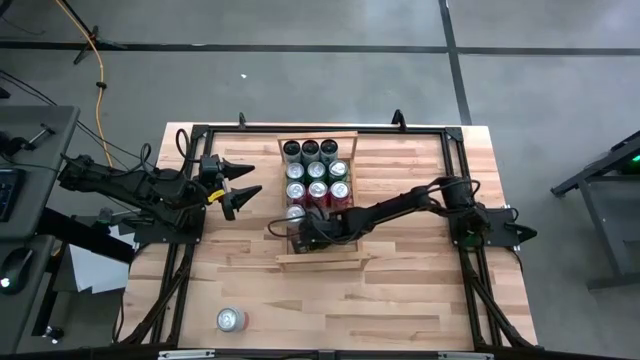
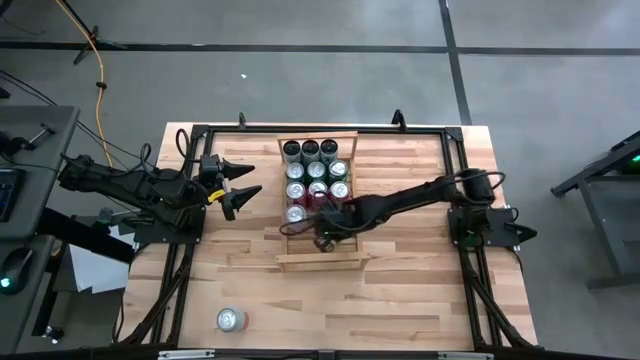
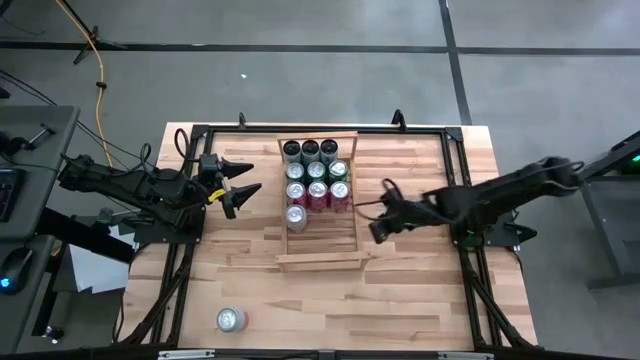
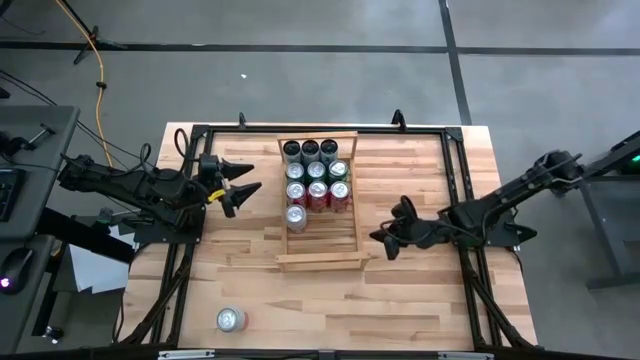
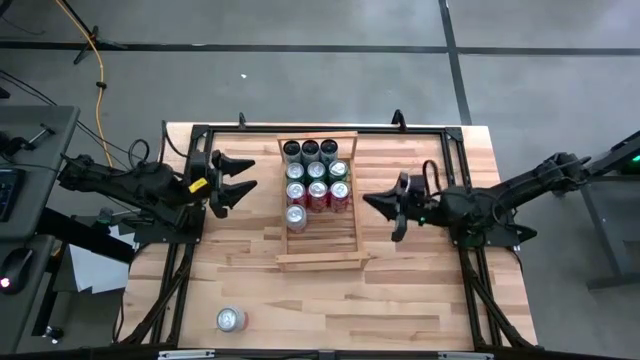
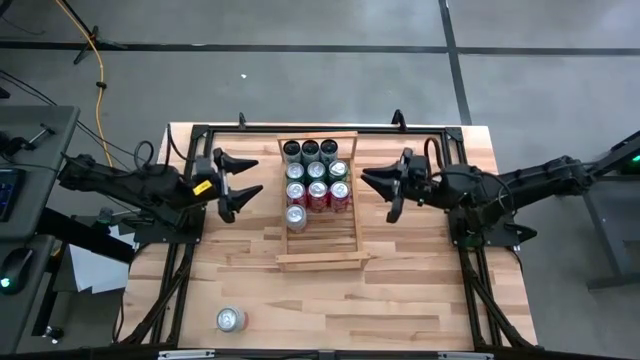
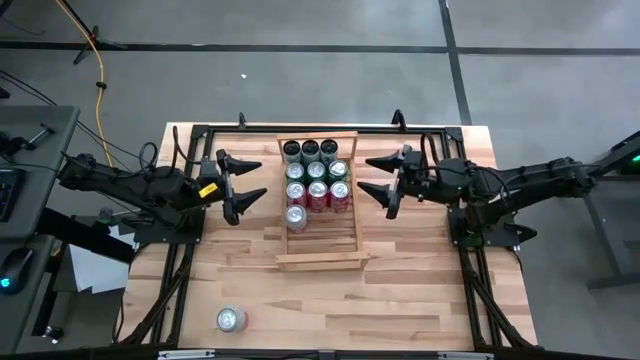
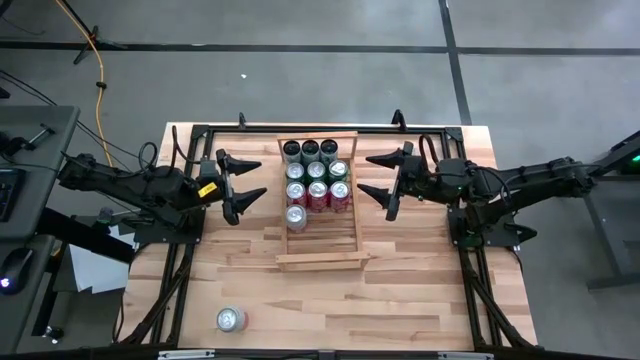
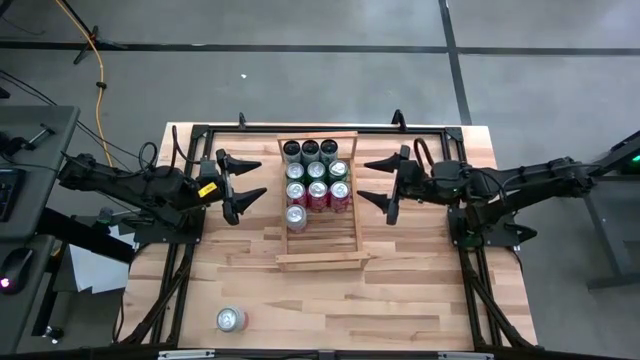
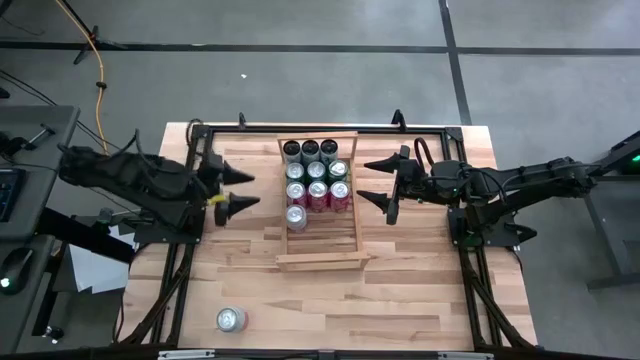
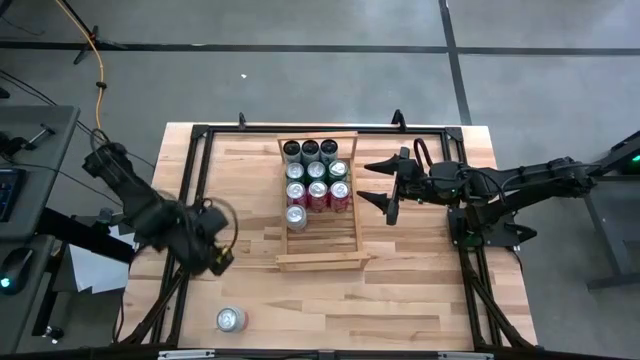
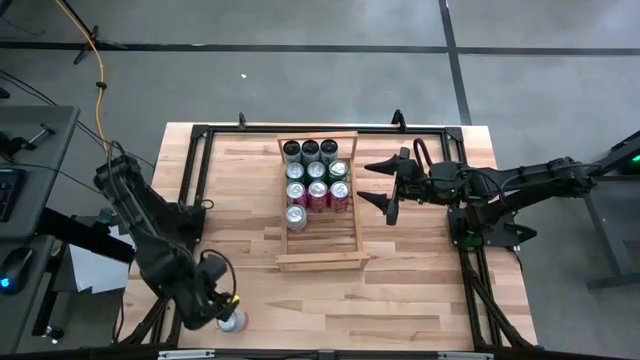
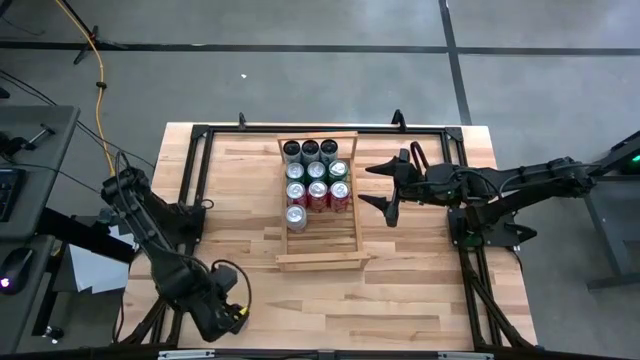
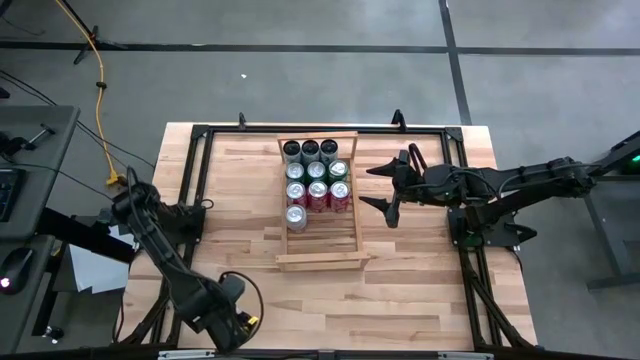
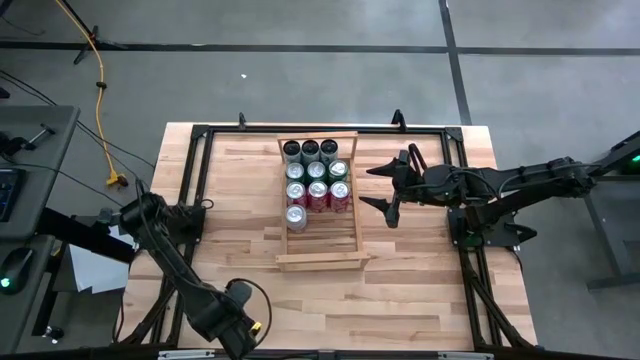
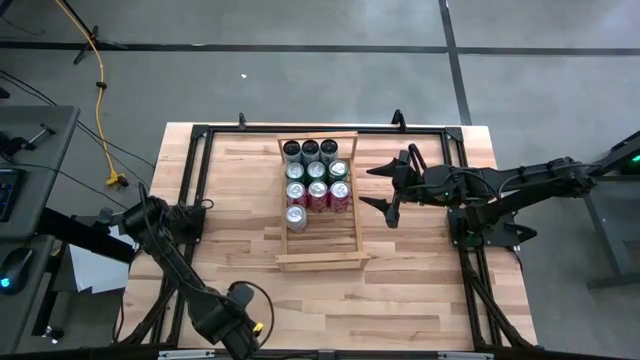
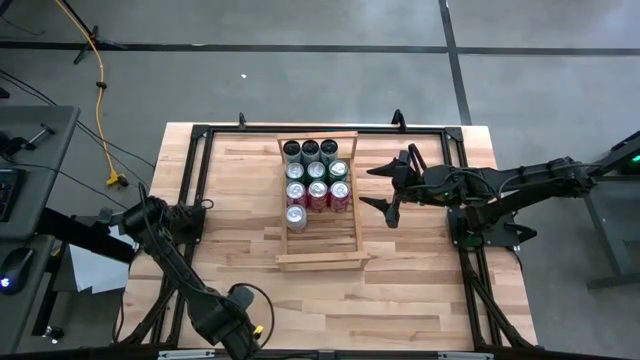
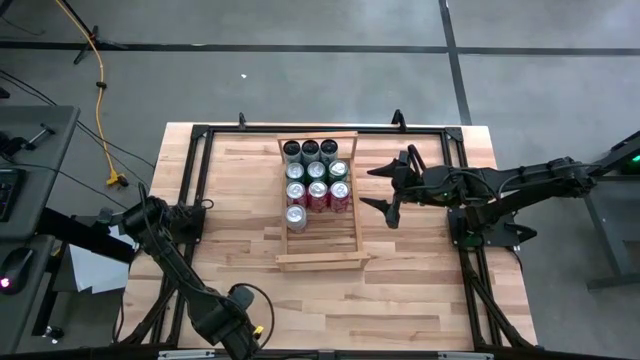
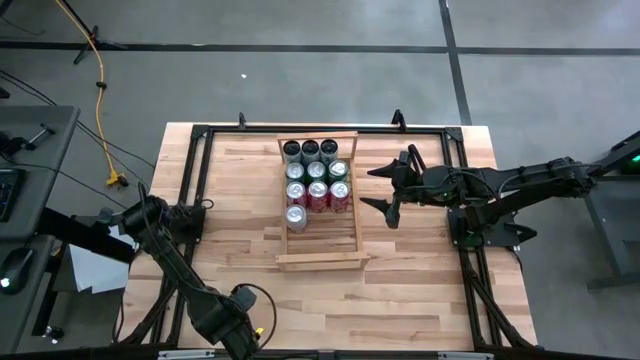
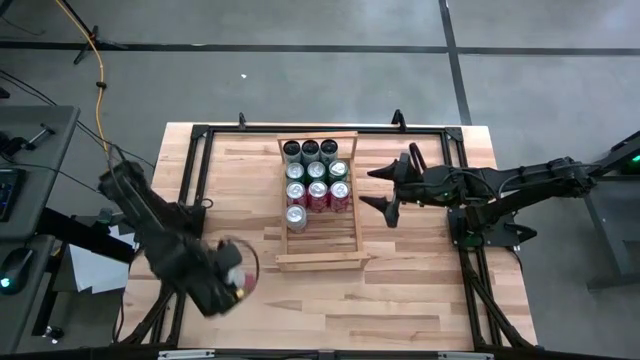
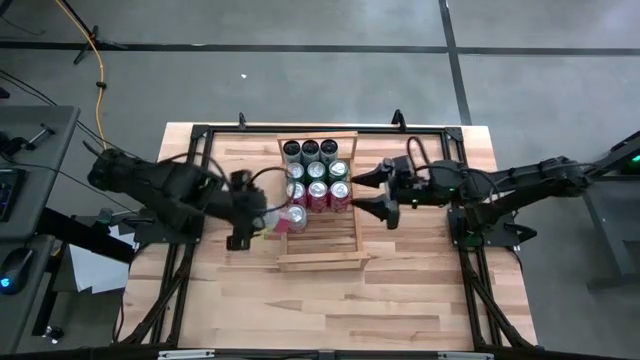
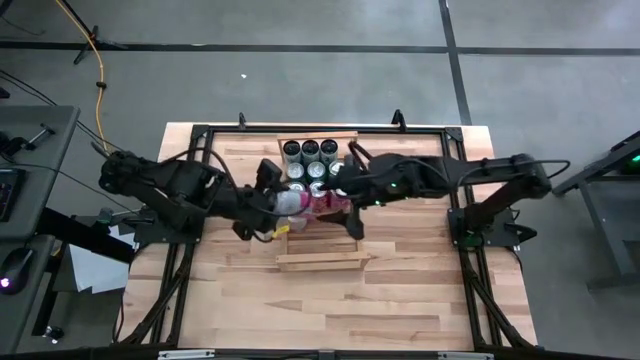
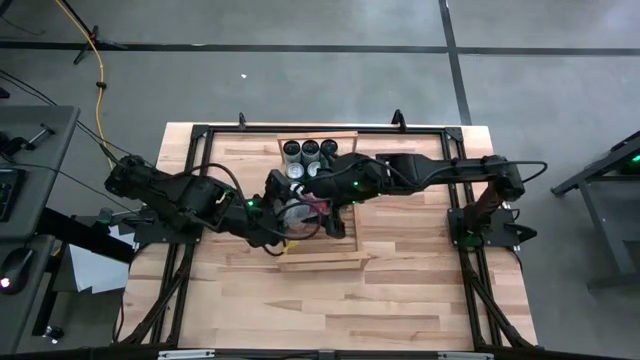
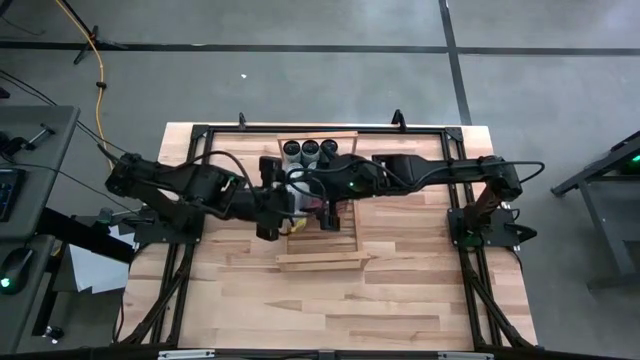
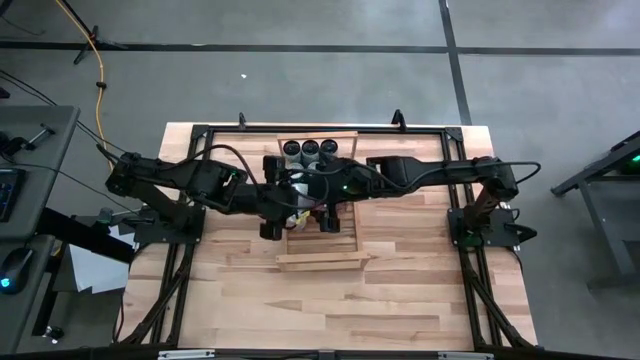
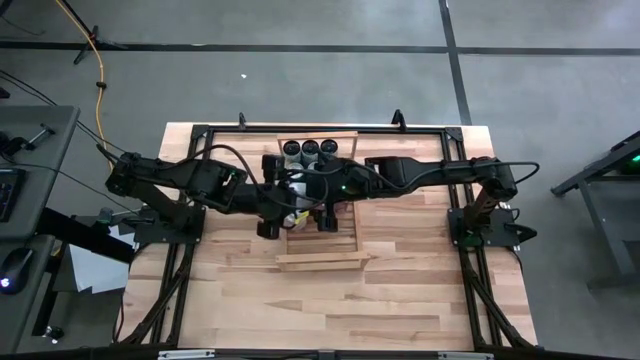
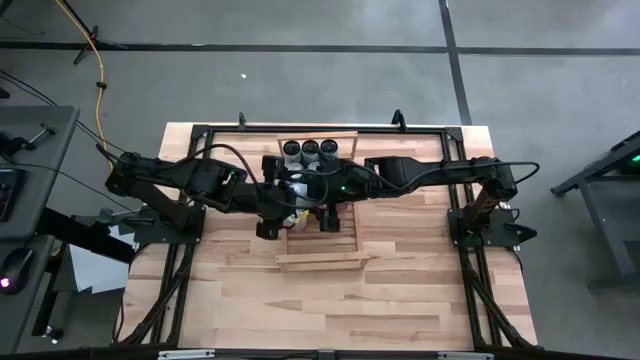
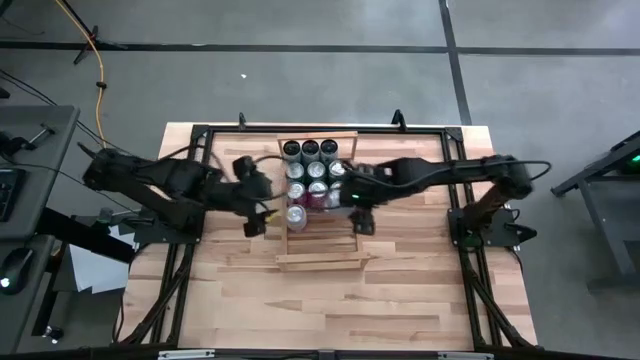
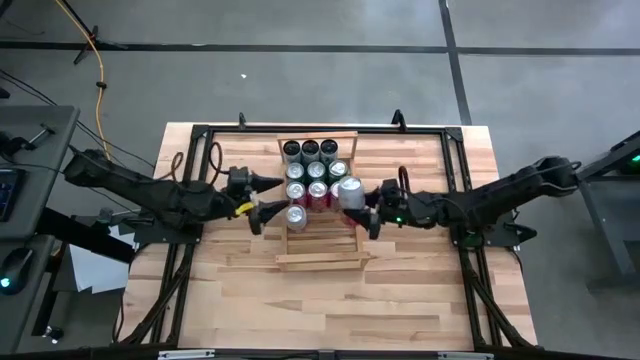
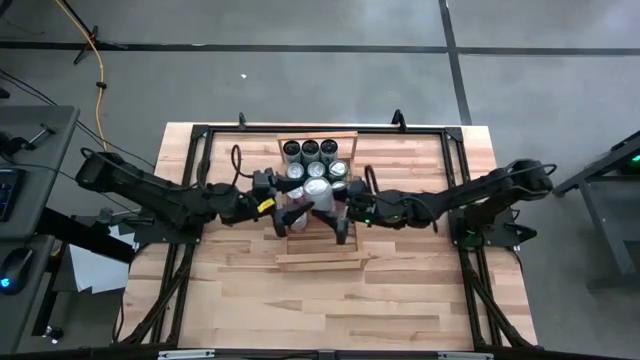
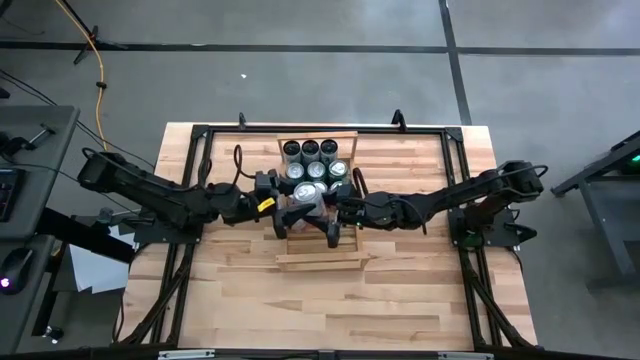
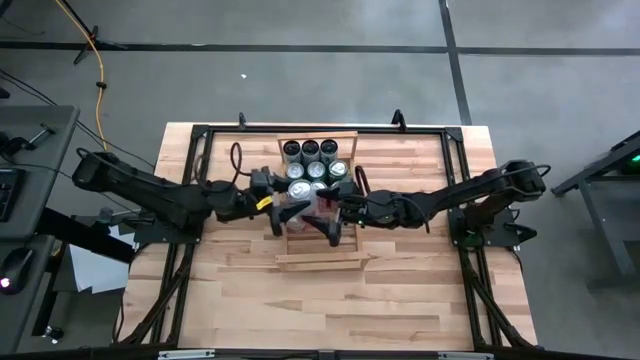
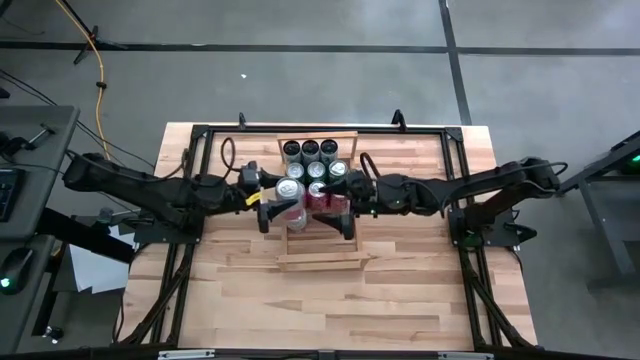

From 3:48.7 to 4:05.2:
Task: Place canned beverage on shelf
Put the pink can on the shelf aligned with the other pink can

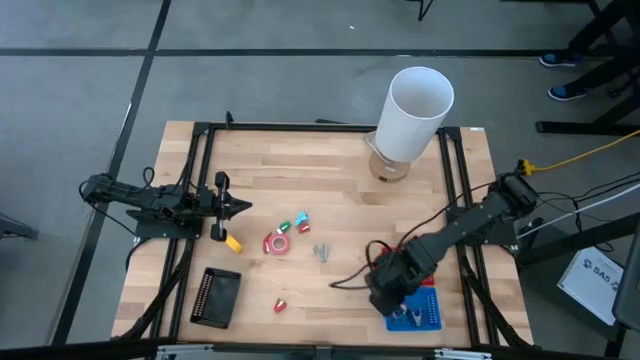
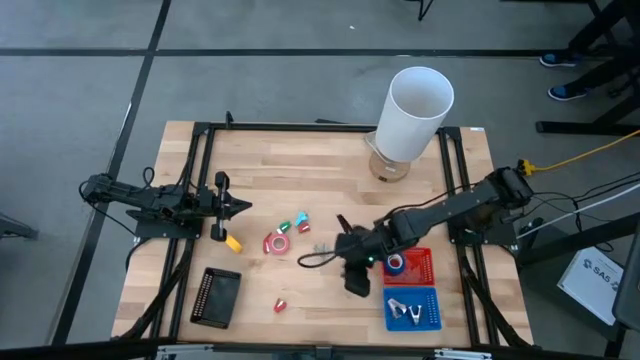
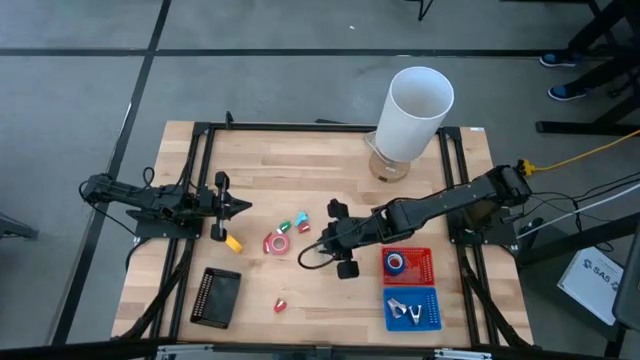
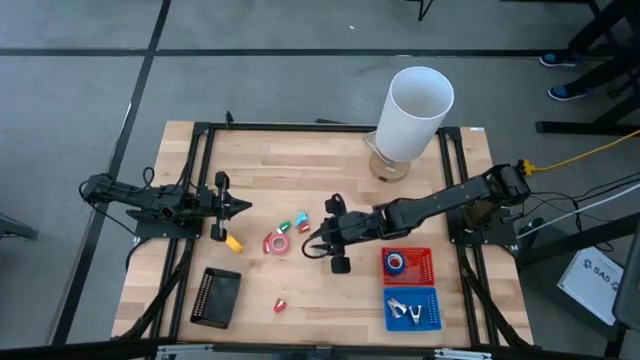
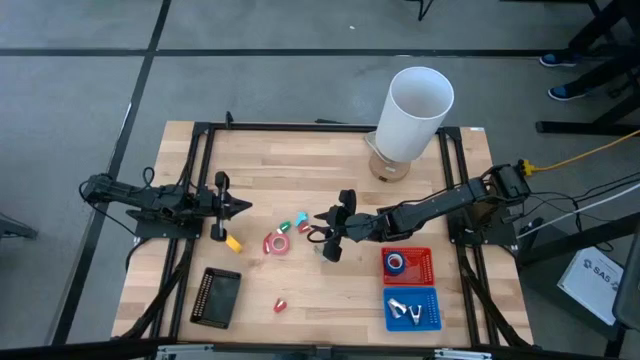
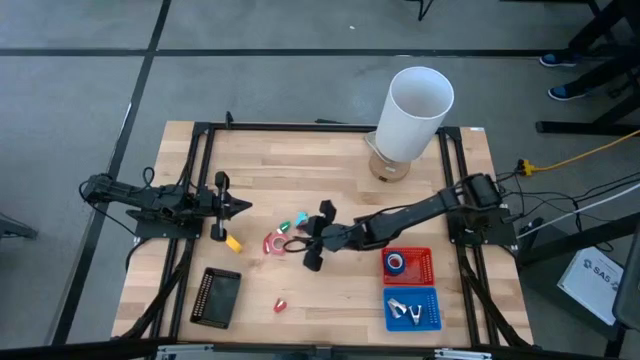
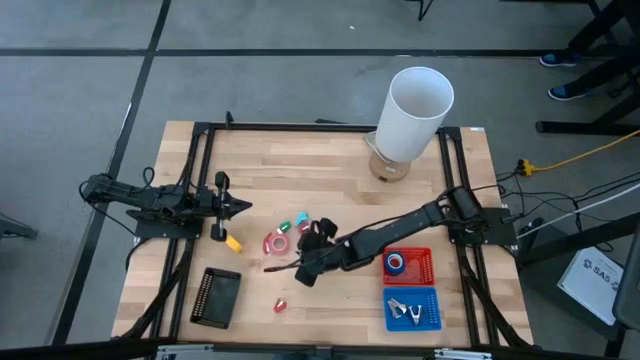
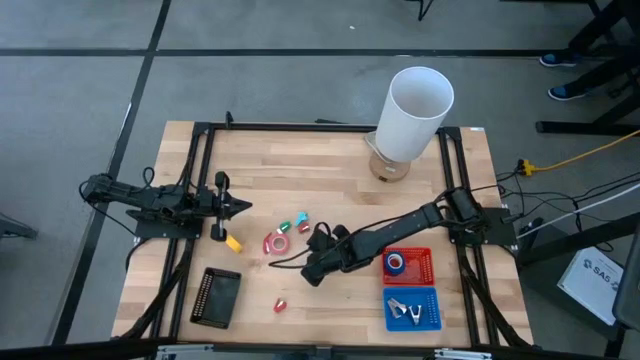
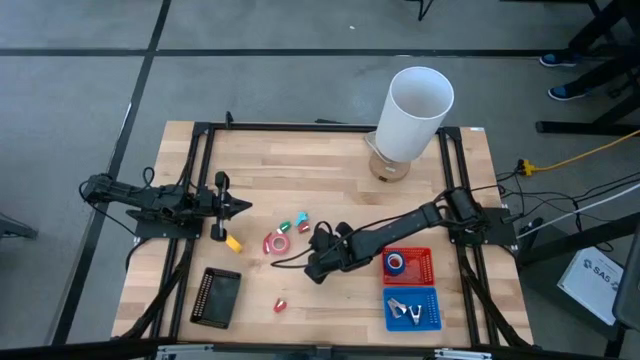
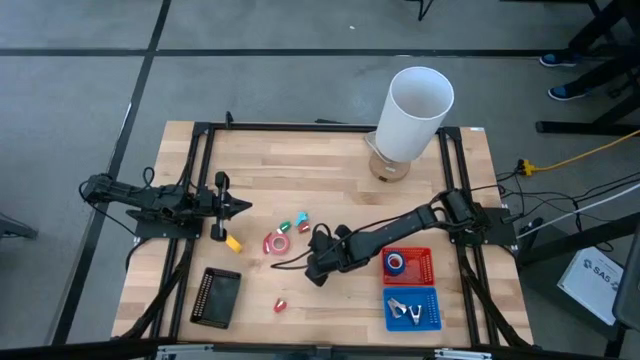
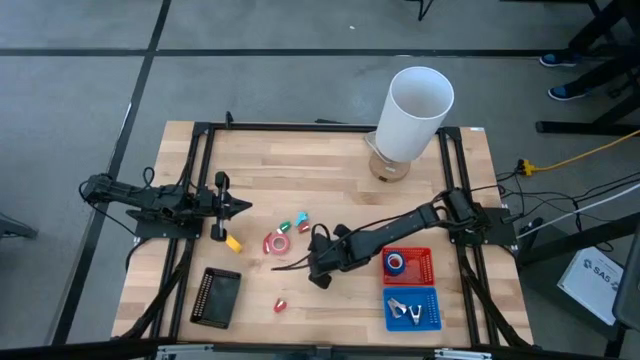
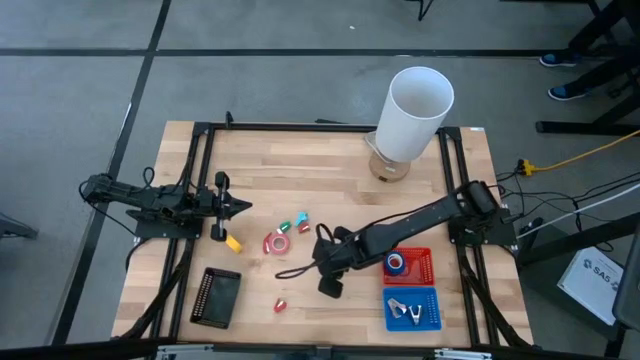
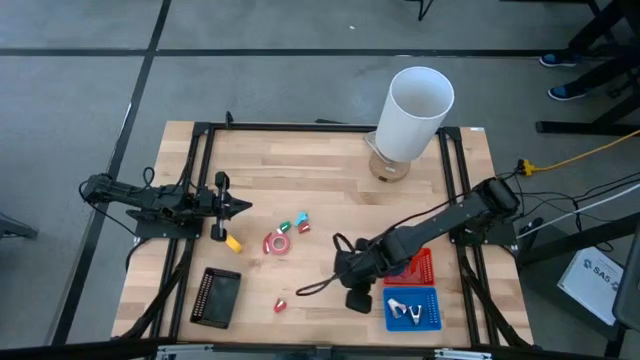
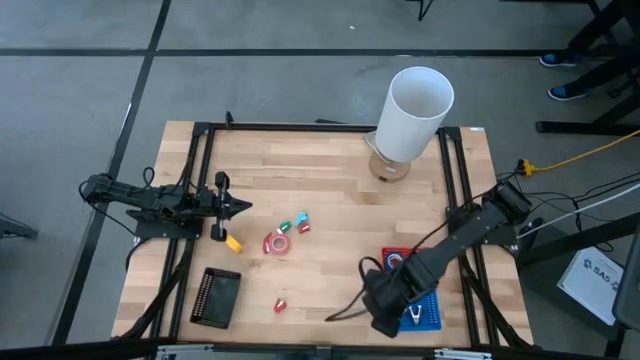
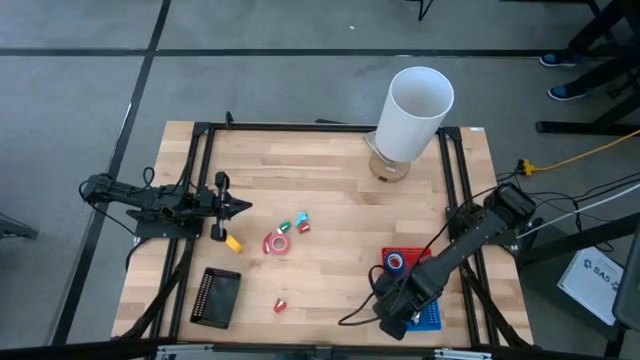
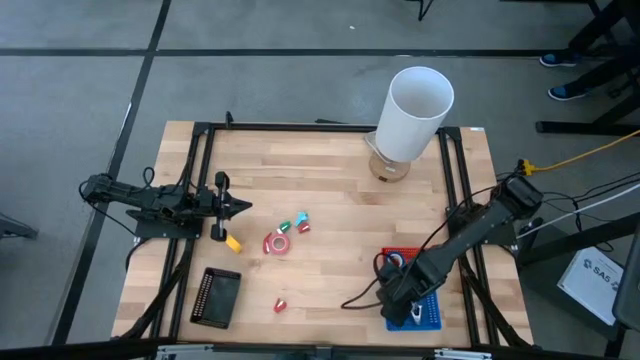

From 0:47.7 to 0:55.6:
Task: Pick and place Stapler, Stapler remover, tape
Put the gray staple remover into the blue basket
